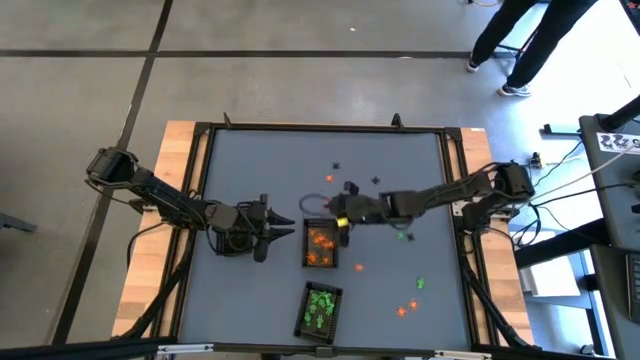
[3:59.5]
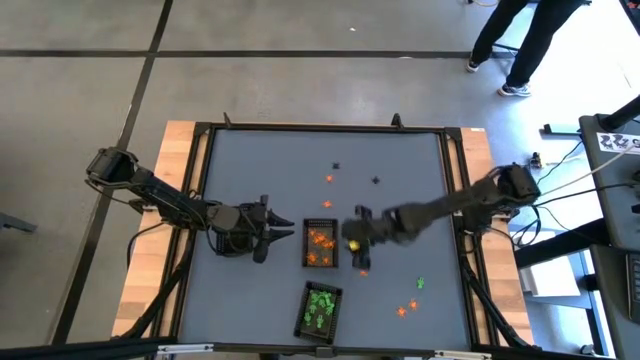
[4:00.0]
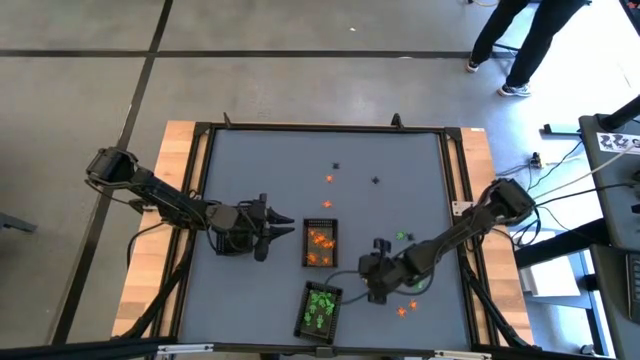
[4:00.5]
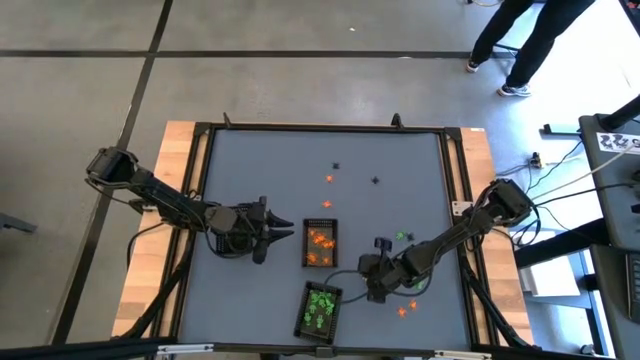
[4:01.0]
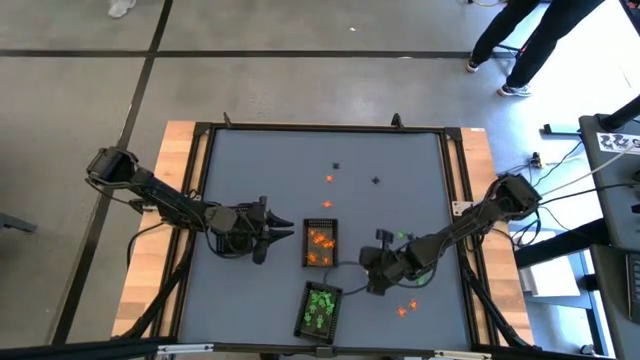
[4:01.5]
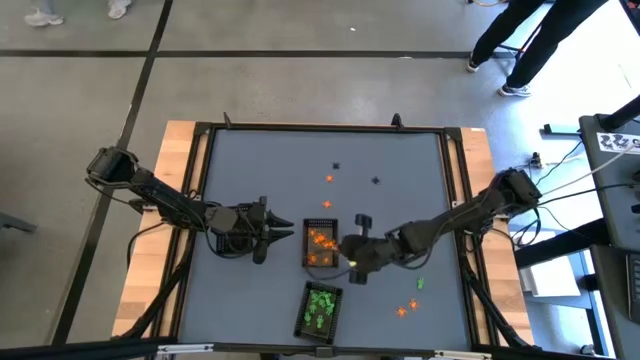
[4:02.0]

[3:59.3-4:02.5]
Task: Sort Halloween decoration
Put the orange spider toy into the top right black basket

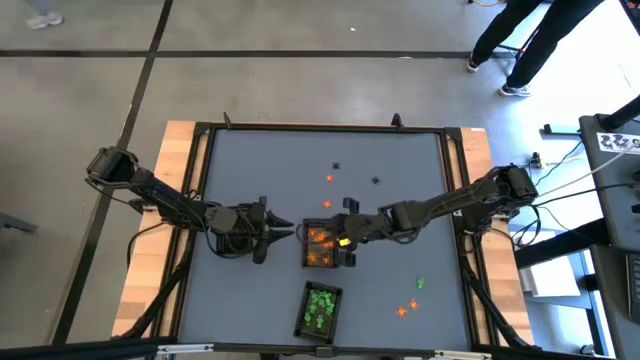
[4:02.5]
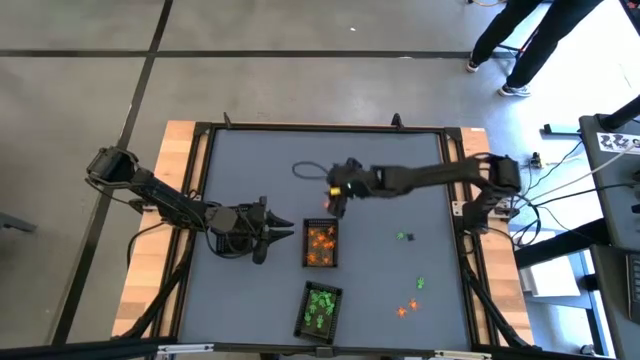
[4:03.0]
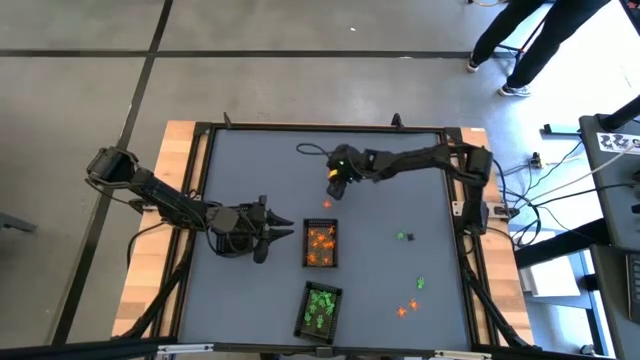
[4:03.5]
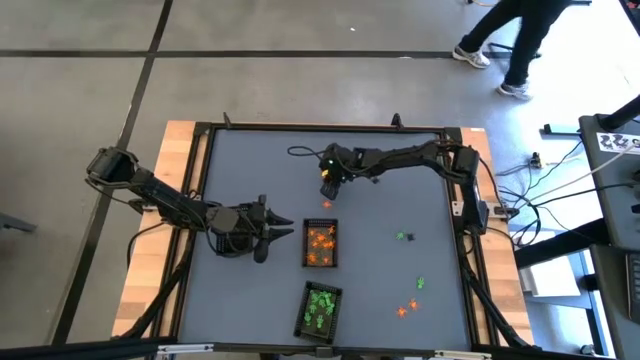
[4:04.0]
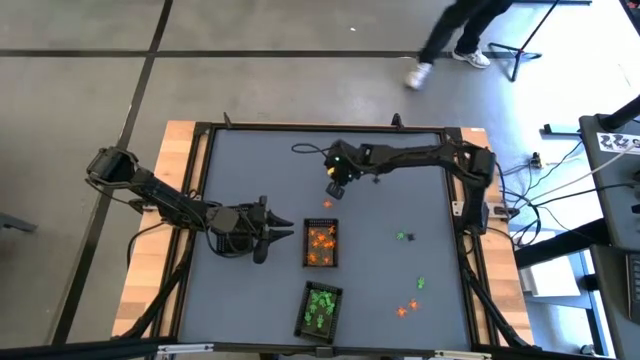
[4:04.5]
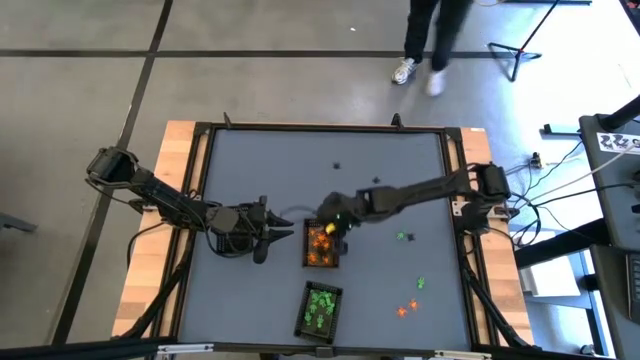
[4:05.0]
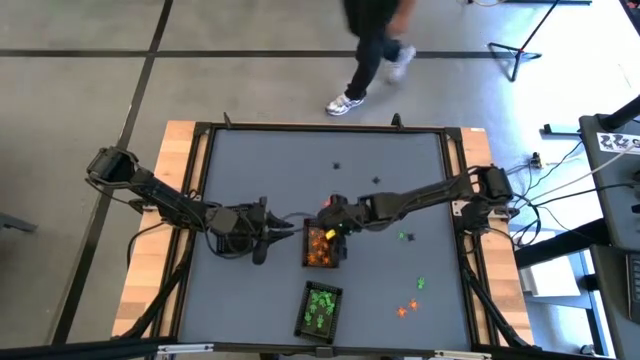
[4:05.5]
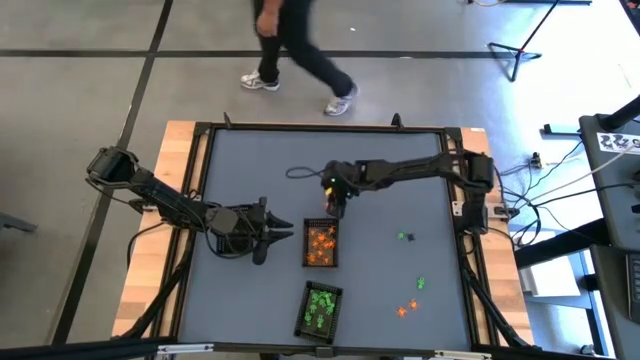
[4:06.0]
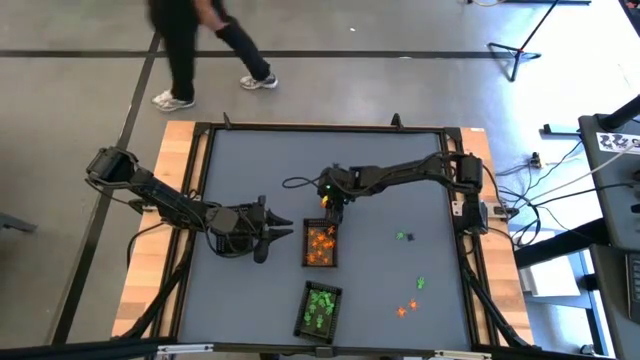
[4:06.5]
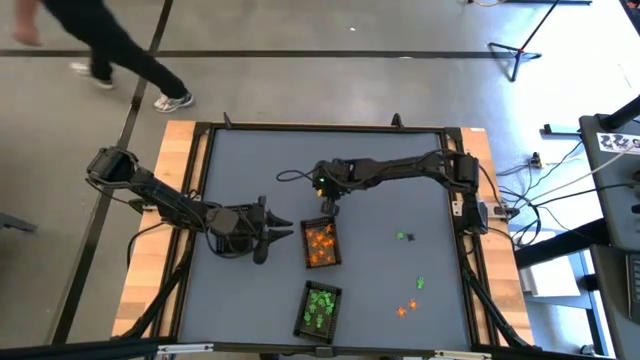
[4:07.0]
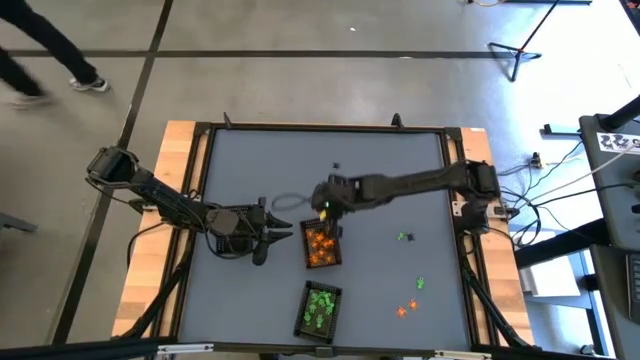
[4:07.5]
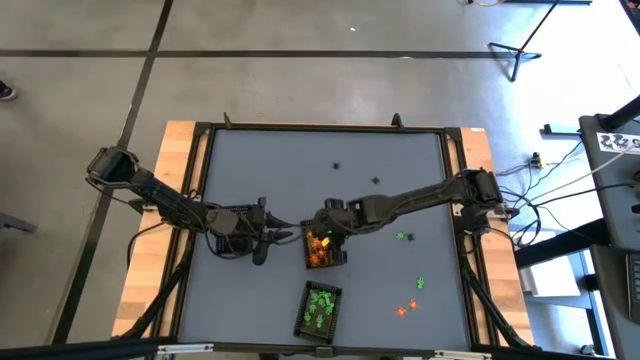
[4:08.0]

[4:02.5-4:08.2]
Put the orange spider toy into the top right black basket

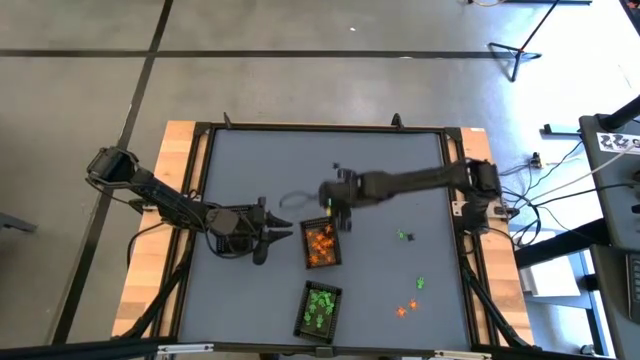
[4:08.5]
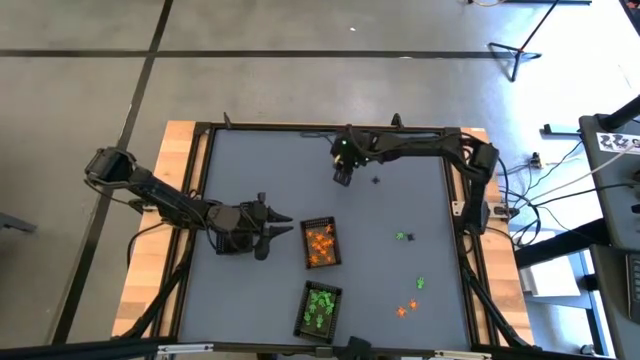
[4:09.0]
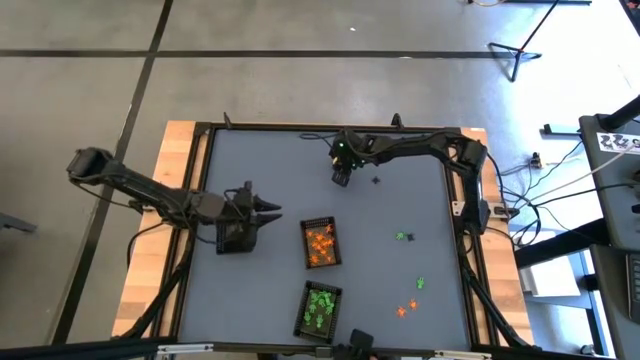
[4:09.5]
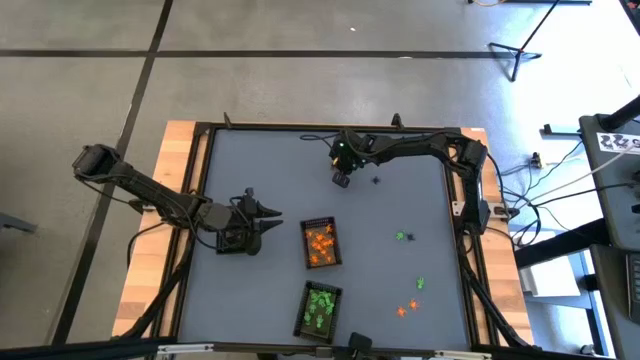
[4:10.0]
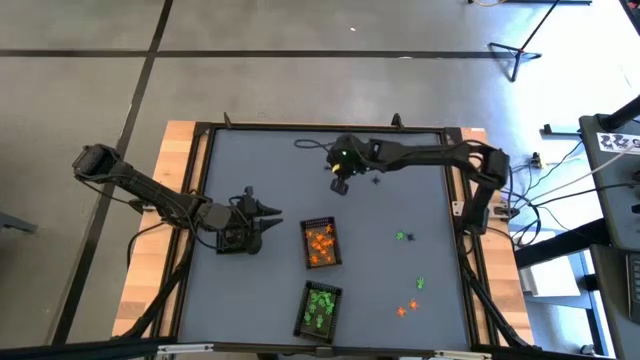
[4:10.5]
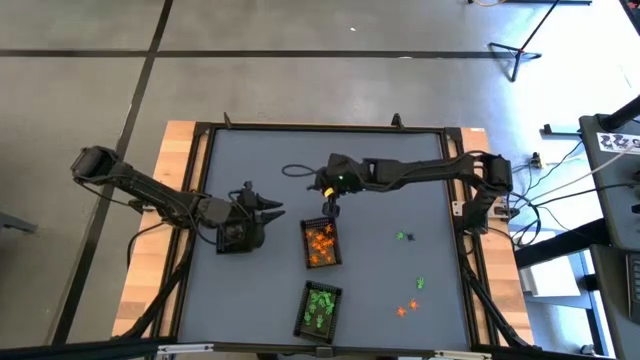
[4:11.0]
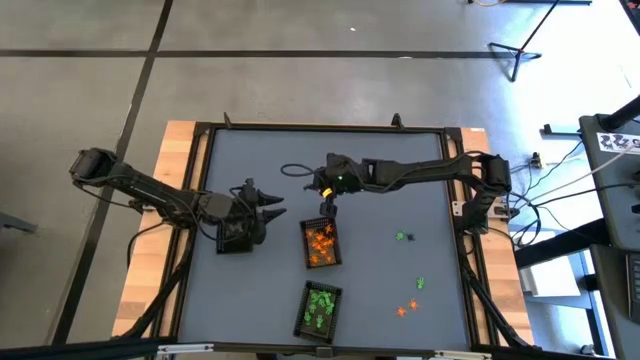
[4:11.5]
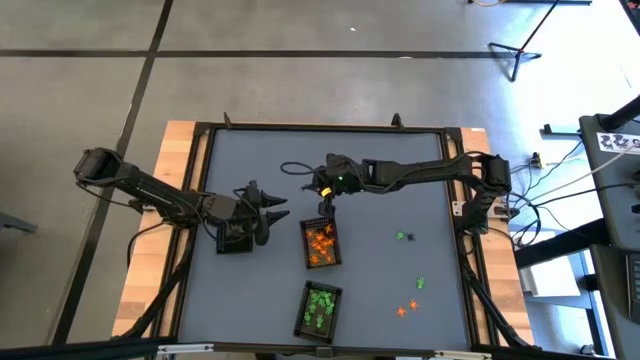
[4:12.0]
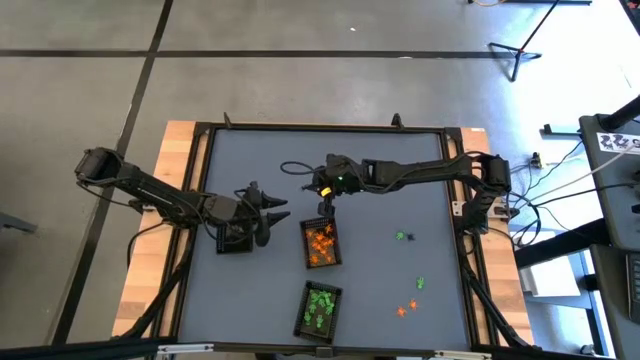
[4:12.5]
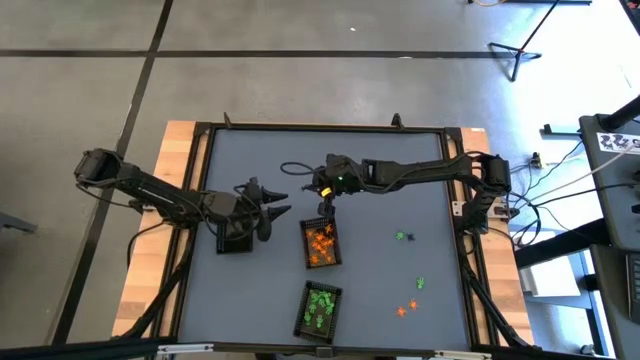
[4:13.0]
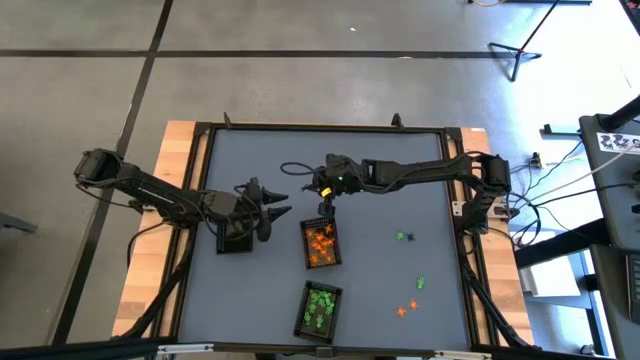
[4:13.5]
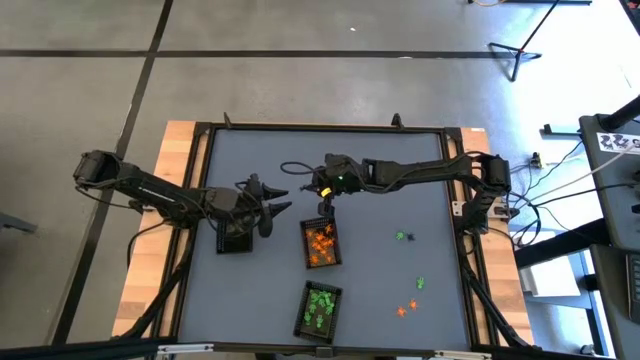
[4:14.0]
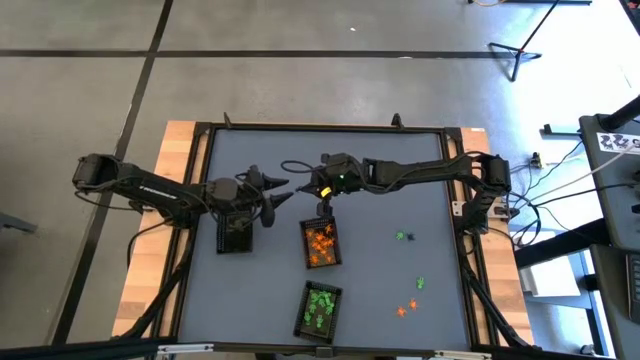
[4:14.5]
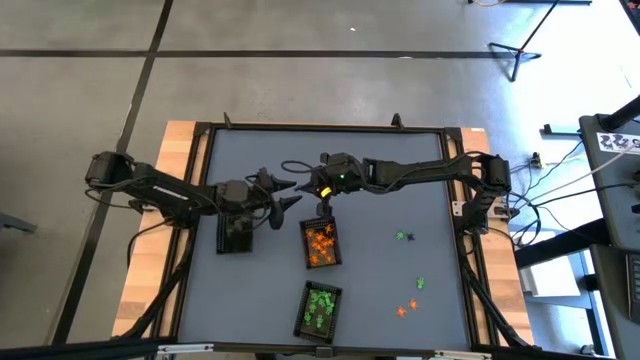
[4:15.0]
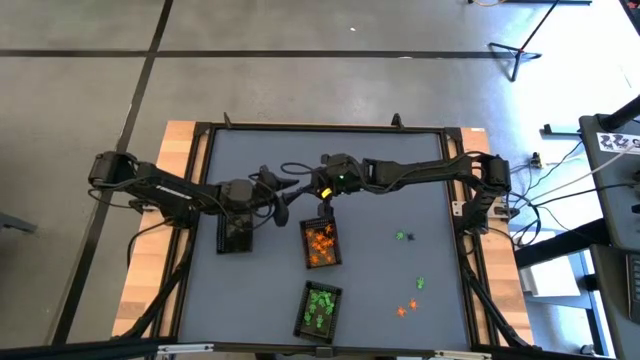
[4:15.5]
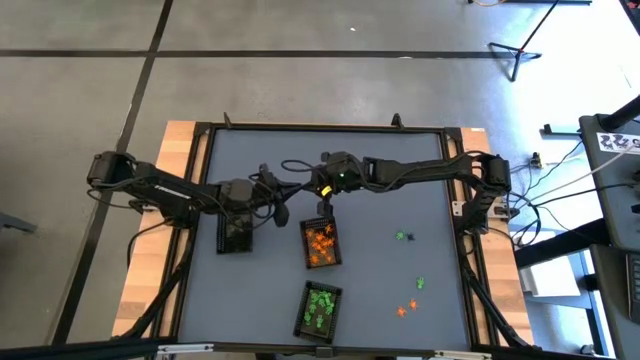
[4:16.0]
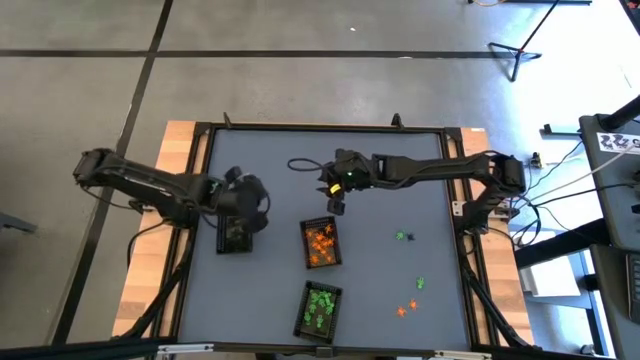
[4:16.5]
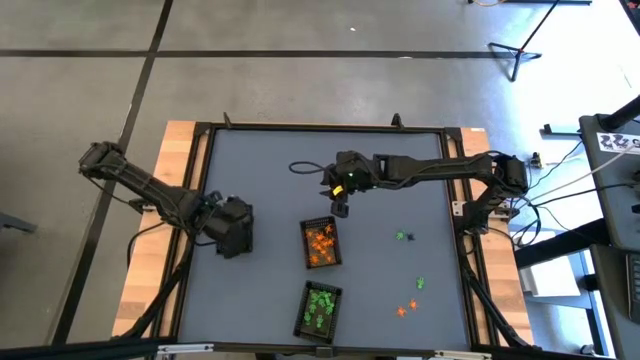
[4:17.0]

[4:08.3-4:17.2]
Put the black spider toy into the top left black basket

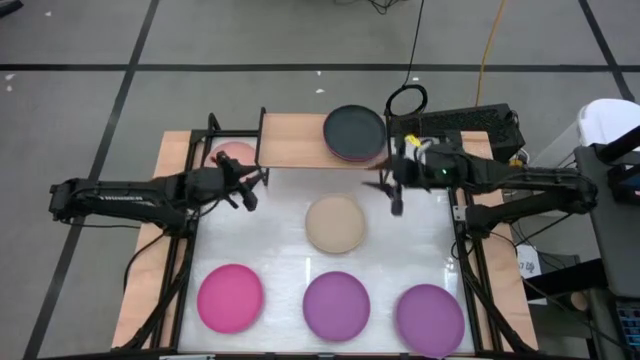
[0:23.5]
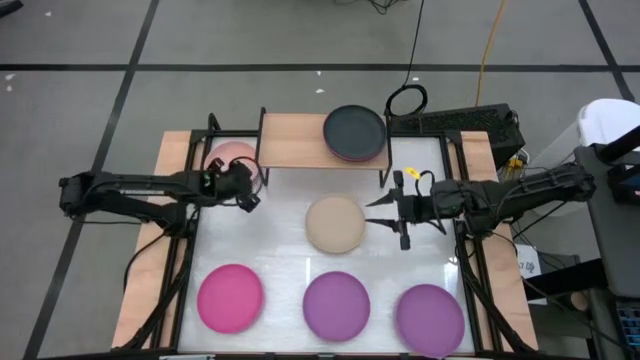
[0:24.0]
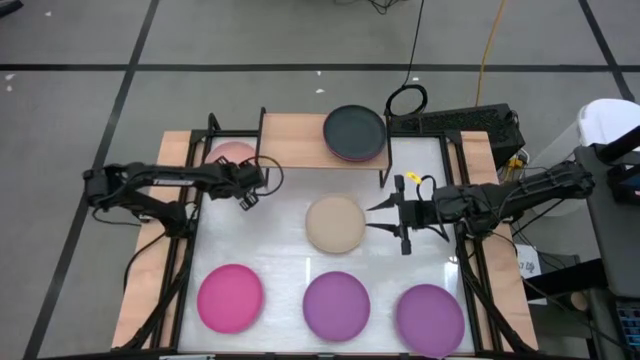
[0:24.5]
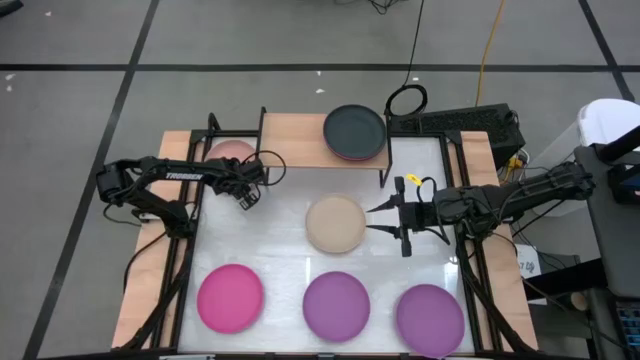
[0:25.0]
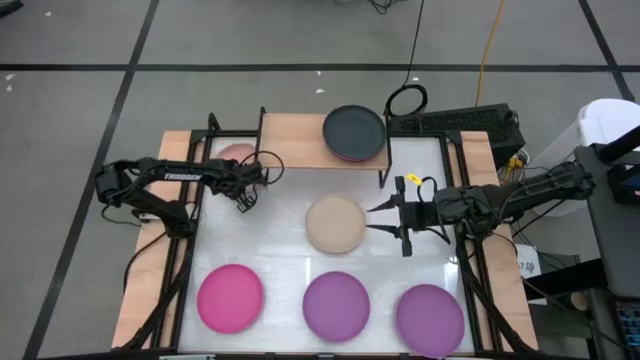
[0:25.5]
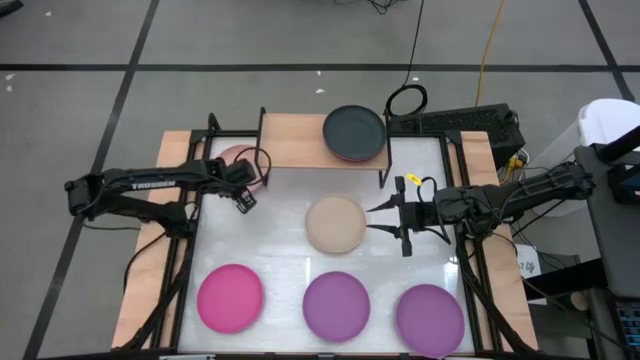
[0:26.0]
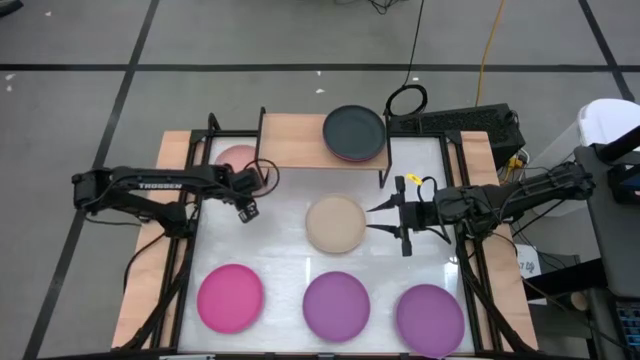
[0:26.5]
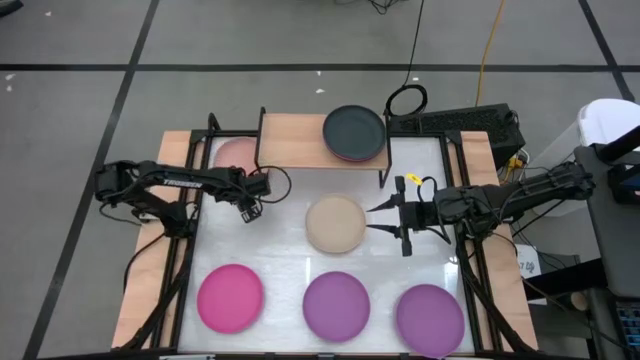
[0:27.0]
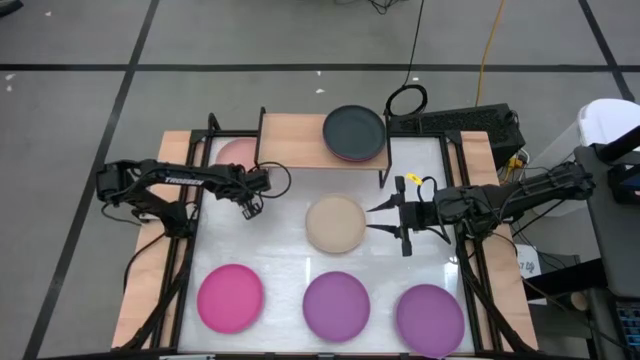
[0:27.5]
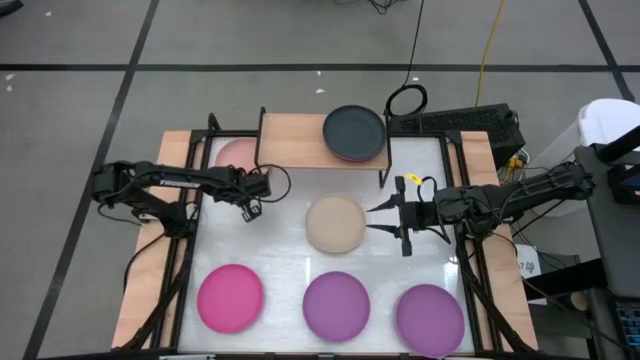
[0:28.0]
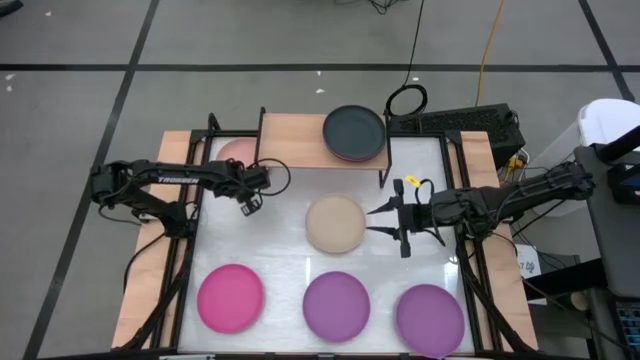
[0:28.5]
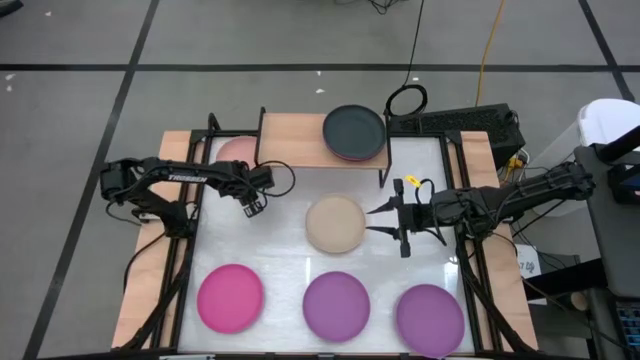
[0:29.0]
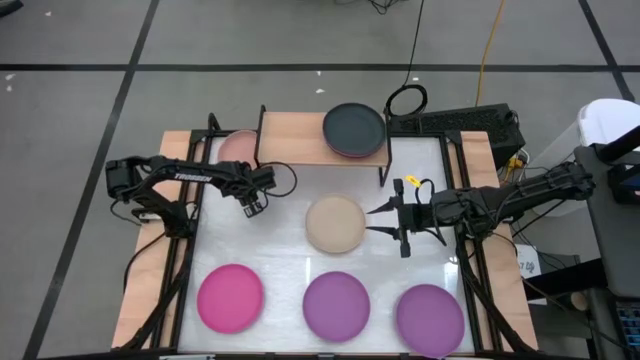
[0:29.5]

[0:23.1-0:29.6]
Task: Place and stack plates onto a shelf
Stack the light pink plate on the black plate on the shelf
